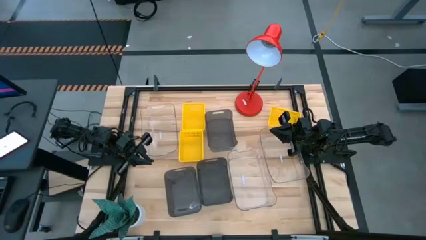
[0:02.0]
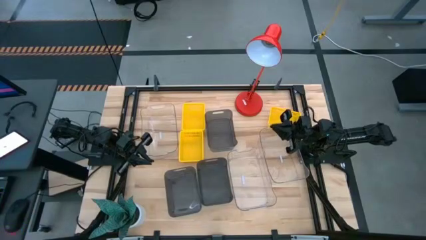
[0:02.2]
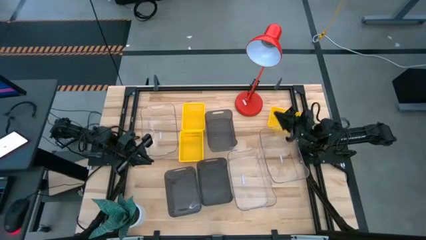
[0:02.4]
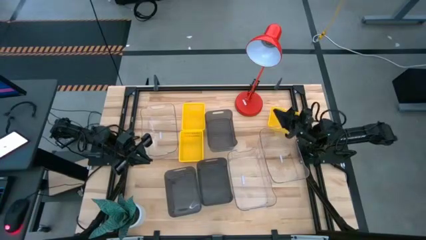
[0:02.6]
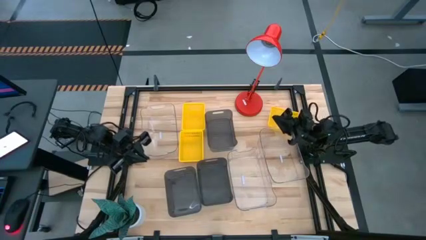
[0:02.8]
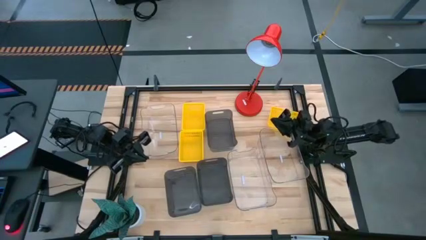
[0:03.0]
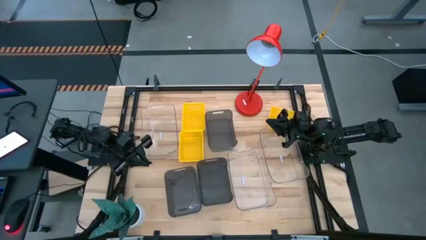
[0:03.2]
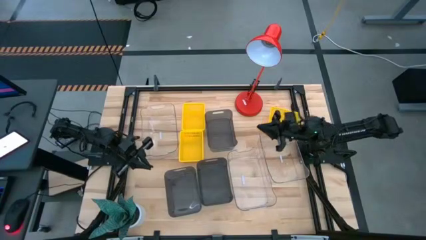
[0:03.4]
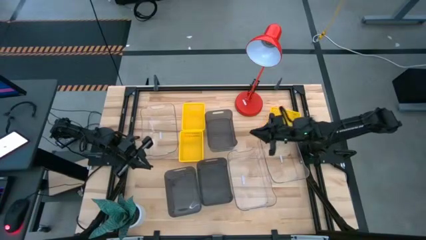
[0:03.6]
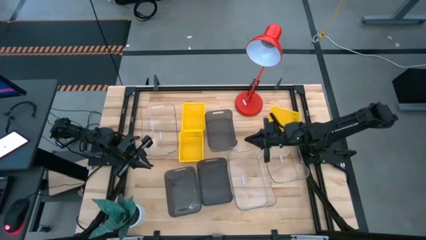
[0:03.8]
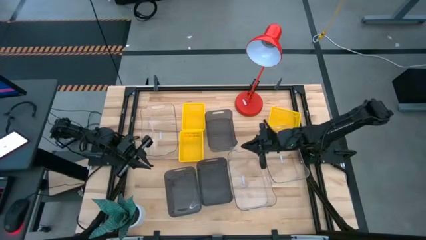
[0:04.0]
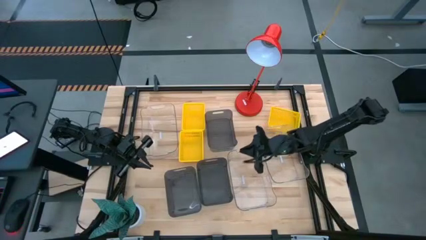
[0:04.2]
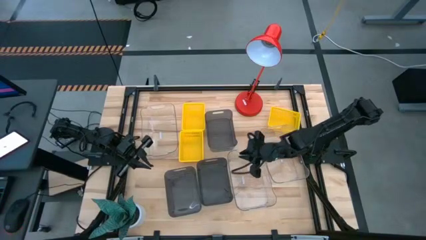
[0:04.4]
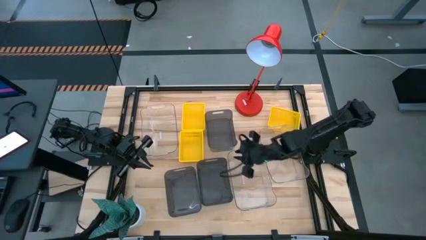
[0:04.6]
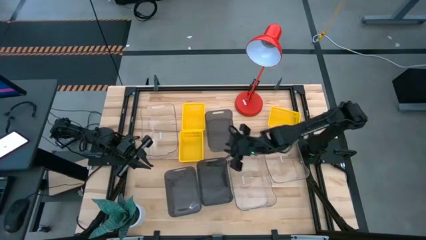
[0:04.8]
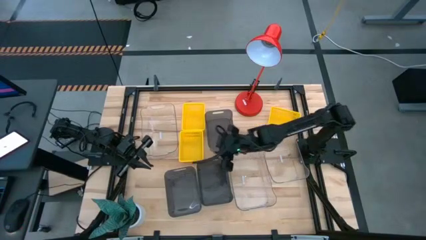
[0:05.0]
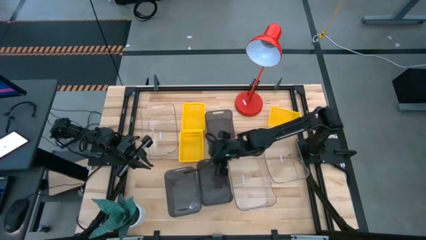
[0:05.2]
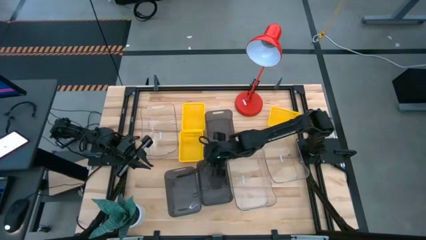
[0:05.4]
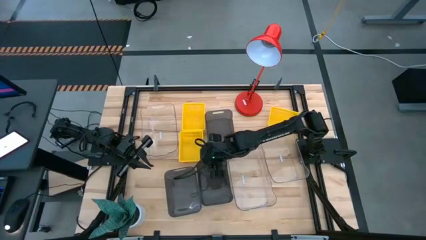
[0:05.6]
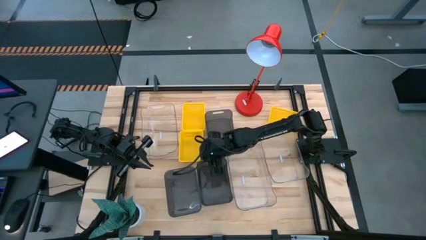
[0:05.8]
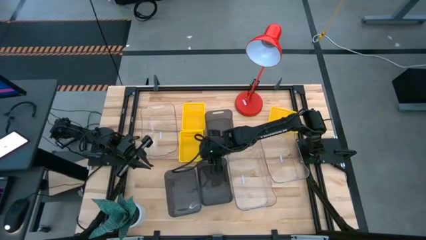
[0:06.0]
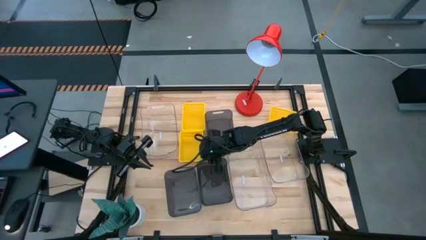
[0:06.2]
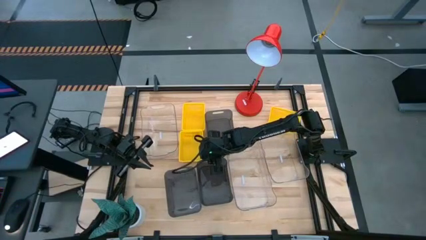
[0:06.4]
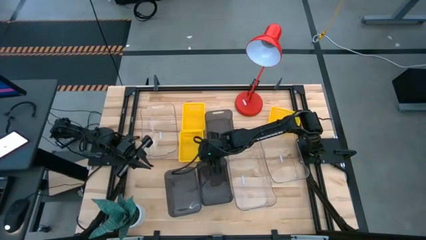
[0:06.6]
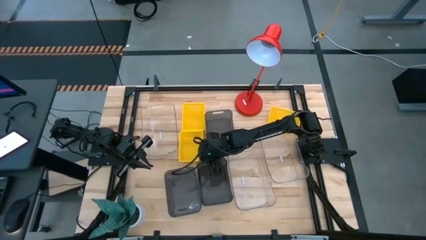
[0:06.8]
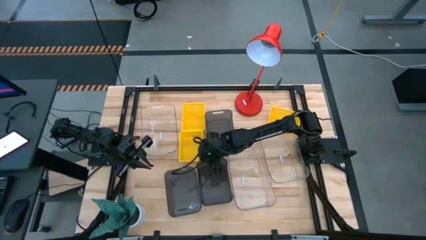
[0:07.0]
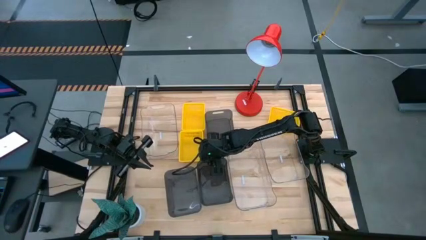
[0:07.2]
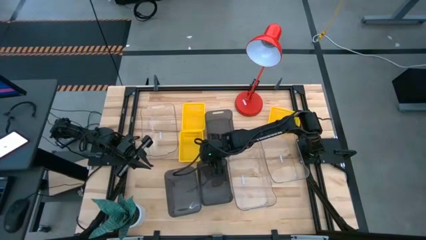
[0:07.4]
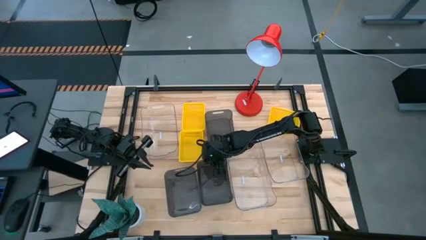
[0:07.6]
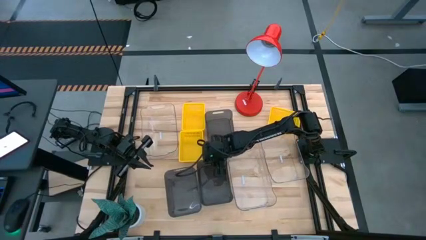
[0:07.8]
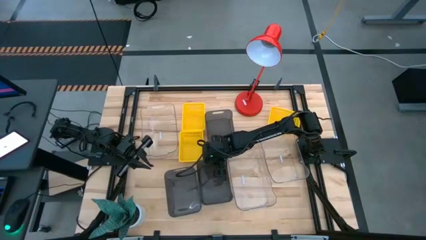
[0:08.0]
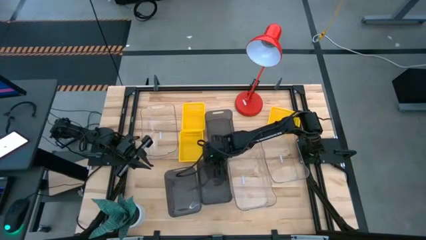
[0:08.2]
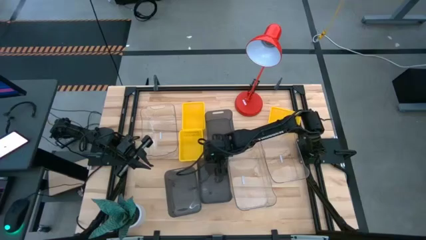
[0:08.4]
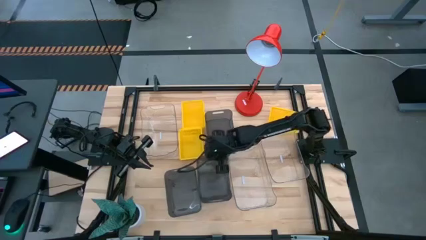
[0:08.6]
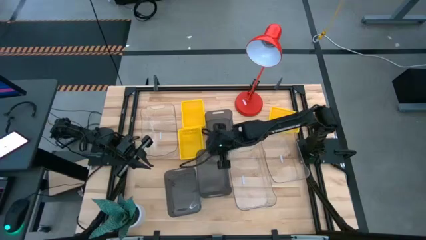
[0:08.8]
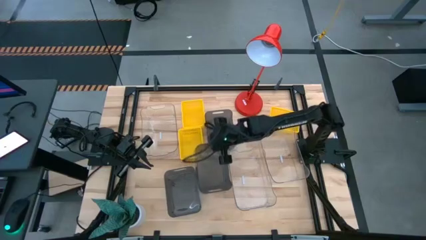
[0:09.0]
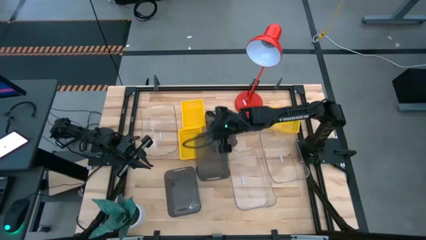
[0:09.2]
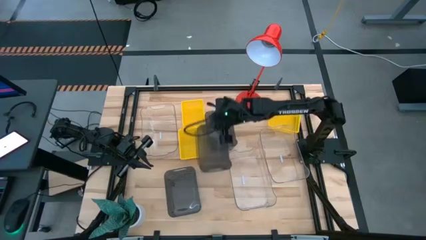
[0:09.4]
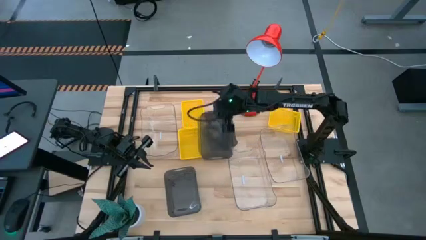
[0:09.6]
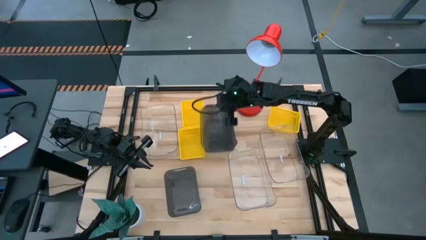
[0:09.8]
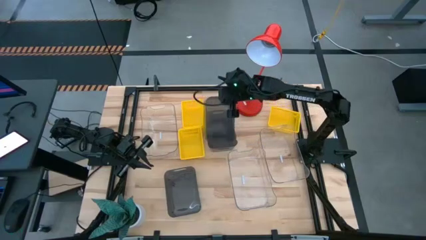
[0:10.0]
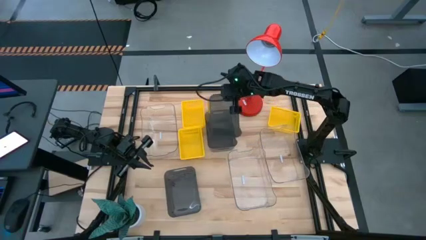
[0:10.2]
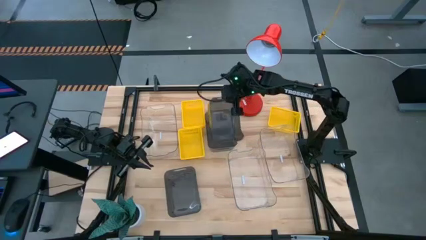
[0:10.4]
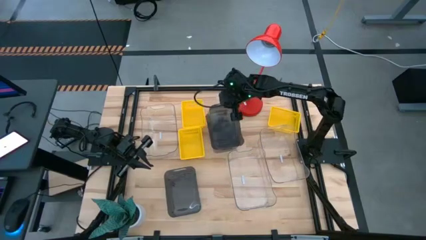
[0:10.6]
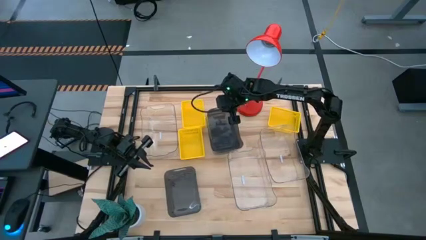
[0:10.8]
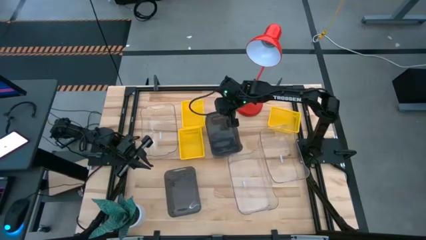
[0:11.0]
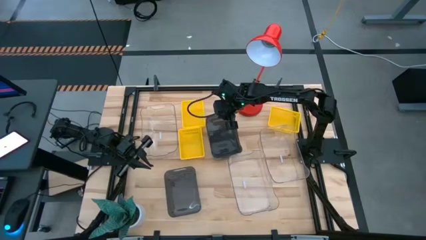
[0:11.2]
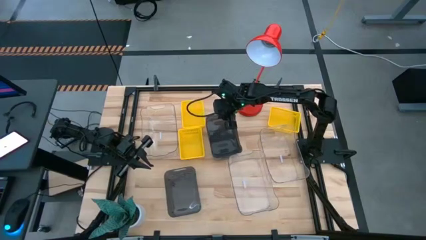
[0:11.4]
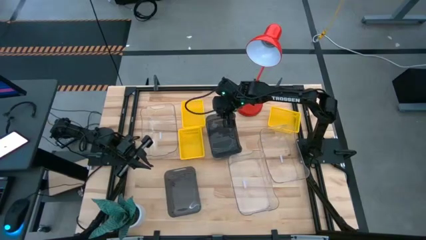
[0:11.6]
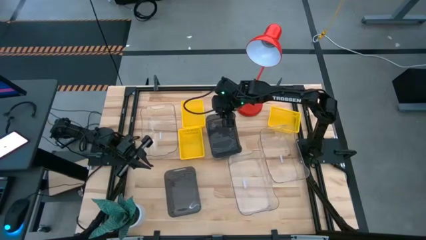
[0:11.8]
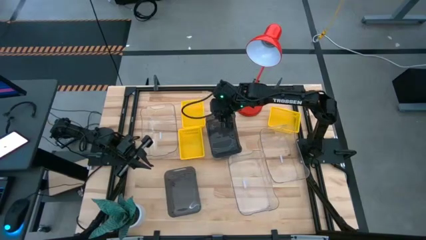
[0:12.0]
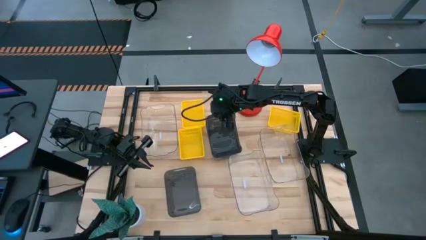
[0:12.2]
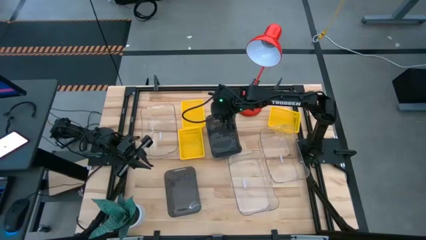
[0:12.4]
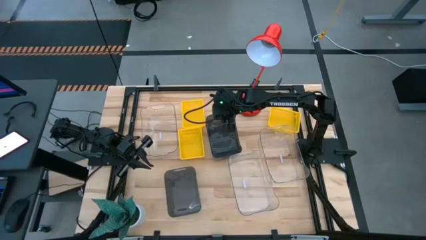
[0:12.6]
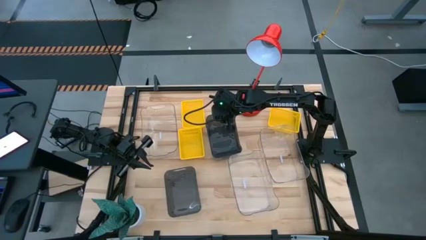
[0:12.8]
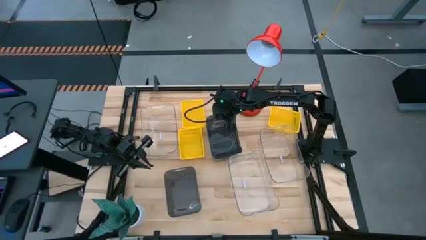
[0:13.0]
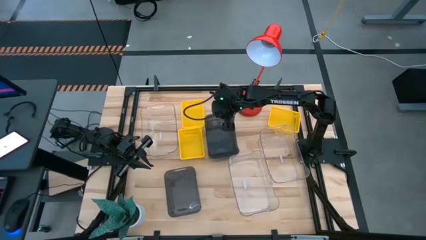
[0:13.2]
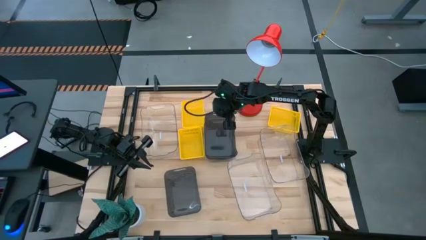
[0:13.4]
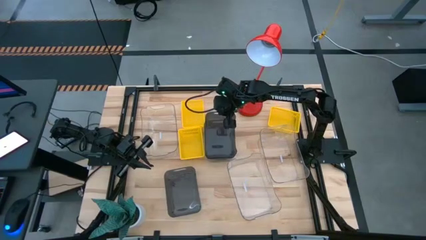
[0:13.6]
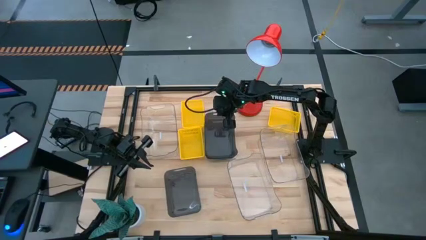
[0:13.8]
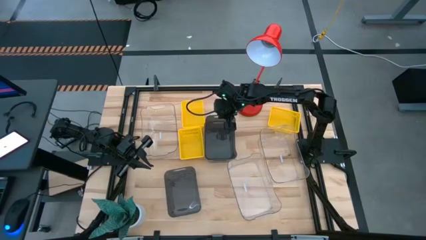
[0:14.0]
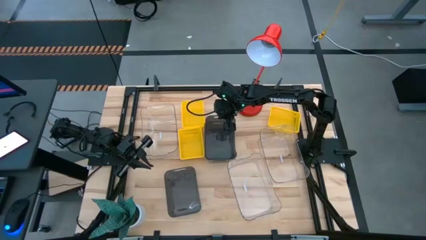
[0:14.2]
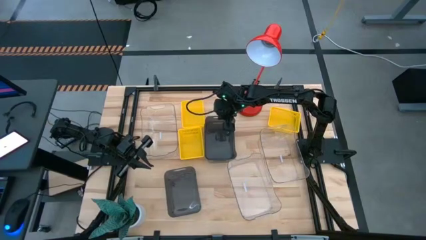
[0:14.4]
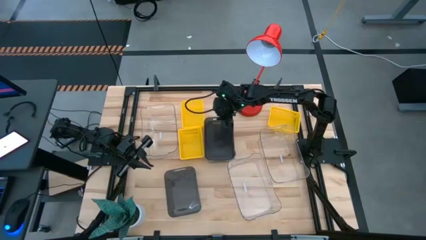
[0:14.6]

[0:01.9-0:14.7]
Stack the bottom right black bin on the top black bin
